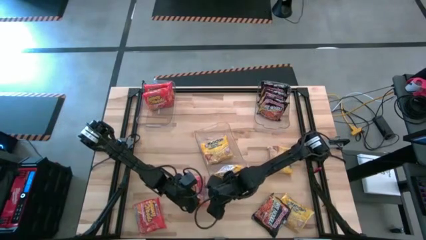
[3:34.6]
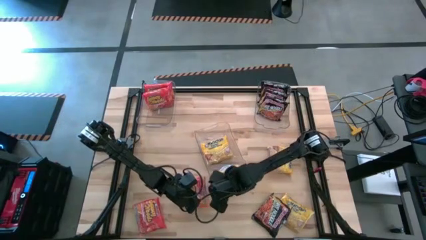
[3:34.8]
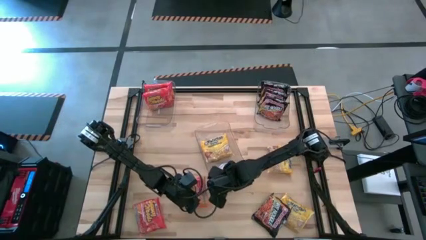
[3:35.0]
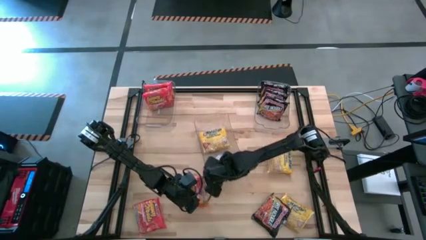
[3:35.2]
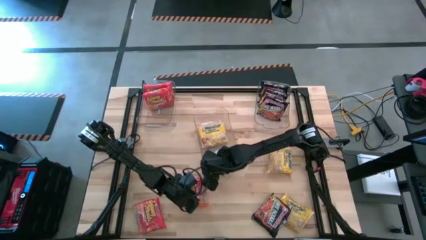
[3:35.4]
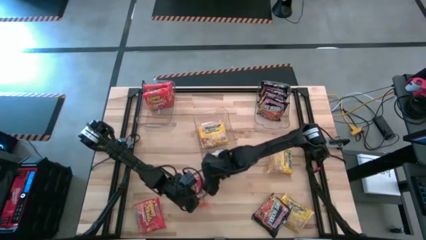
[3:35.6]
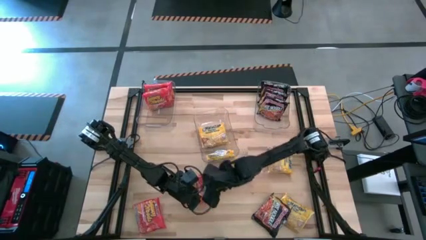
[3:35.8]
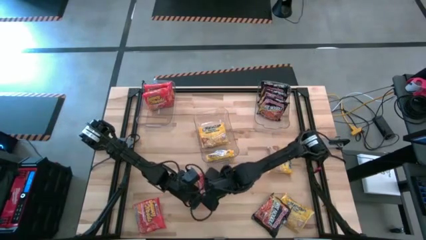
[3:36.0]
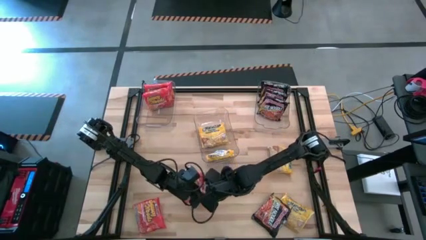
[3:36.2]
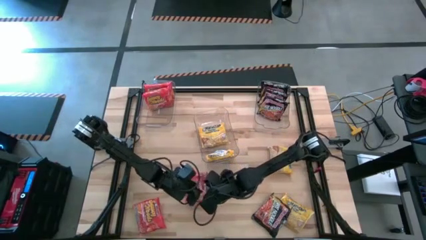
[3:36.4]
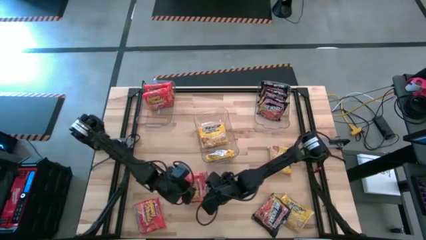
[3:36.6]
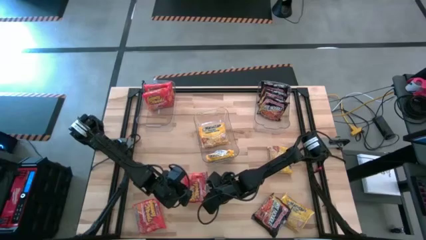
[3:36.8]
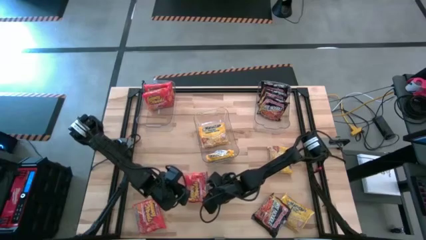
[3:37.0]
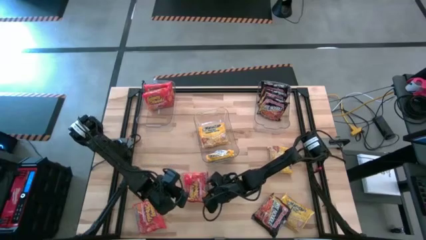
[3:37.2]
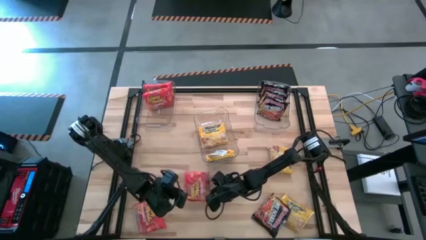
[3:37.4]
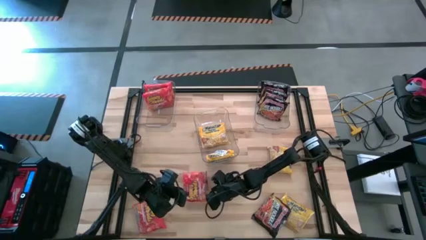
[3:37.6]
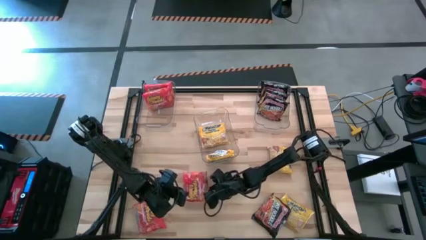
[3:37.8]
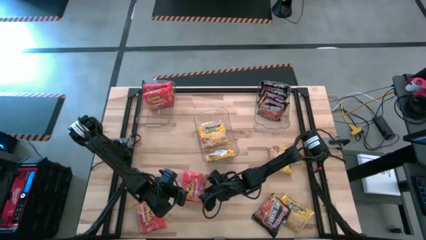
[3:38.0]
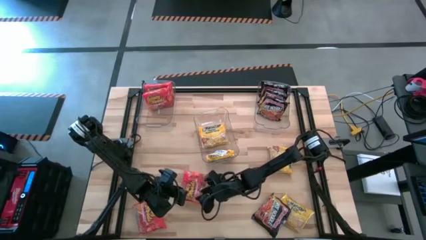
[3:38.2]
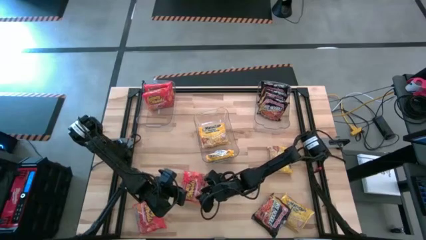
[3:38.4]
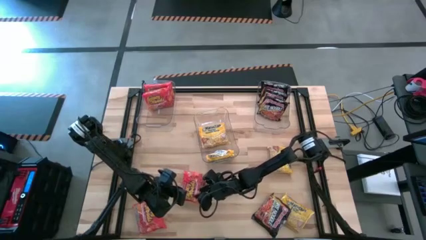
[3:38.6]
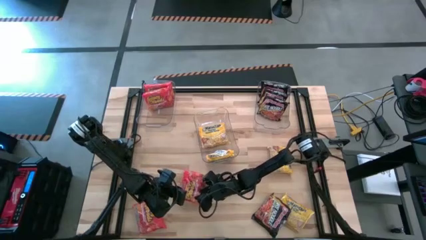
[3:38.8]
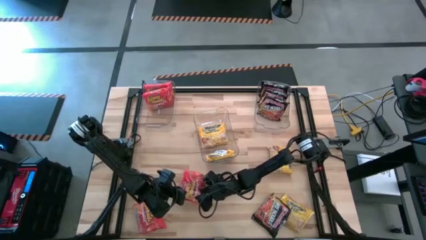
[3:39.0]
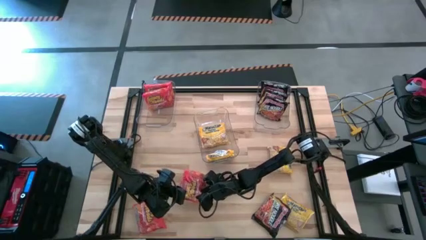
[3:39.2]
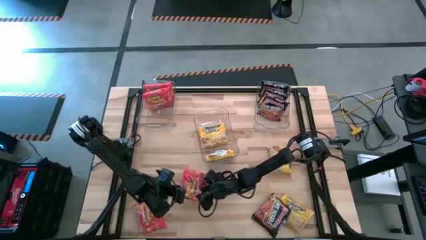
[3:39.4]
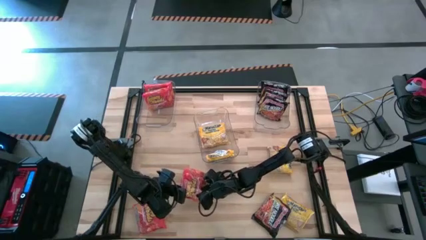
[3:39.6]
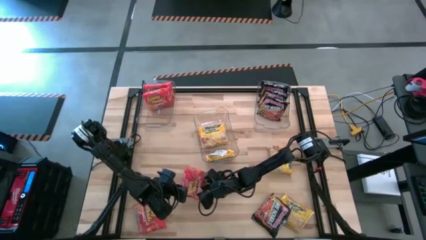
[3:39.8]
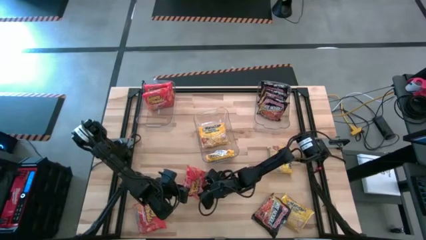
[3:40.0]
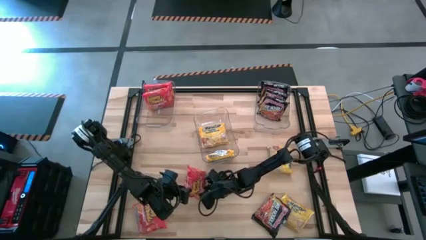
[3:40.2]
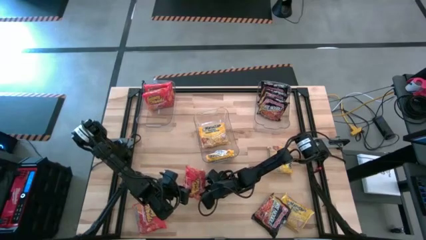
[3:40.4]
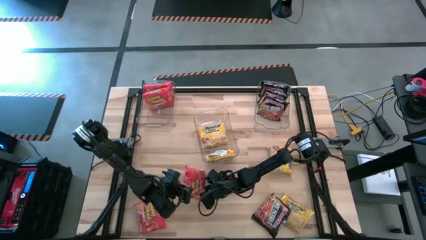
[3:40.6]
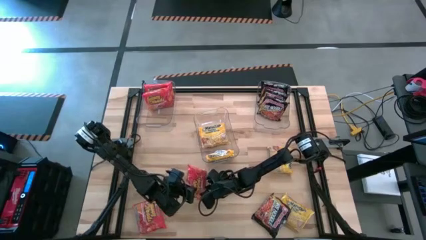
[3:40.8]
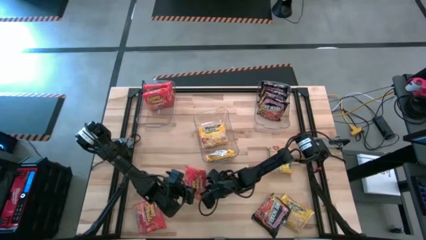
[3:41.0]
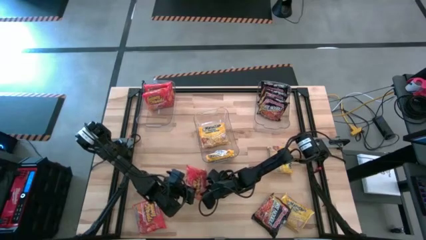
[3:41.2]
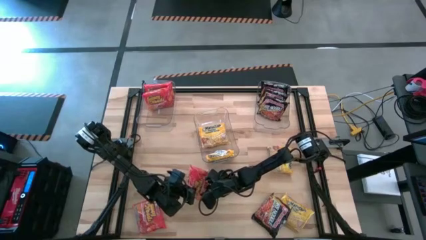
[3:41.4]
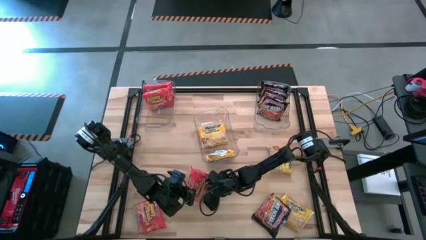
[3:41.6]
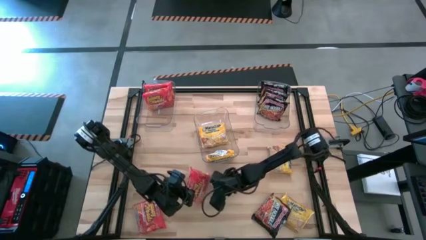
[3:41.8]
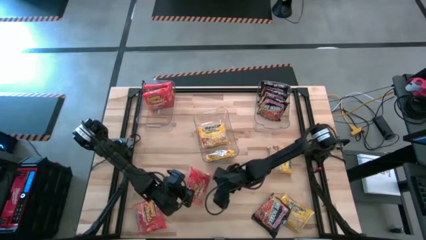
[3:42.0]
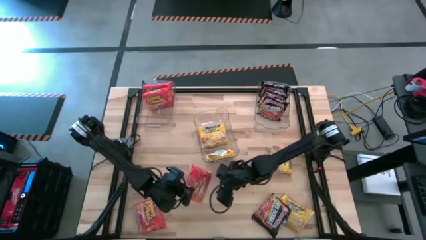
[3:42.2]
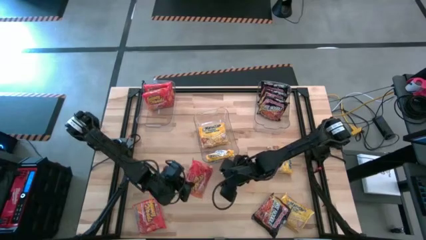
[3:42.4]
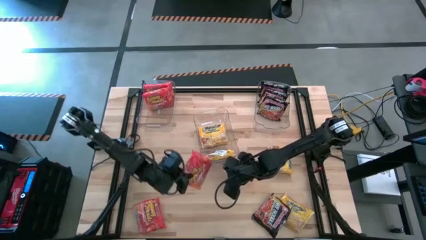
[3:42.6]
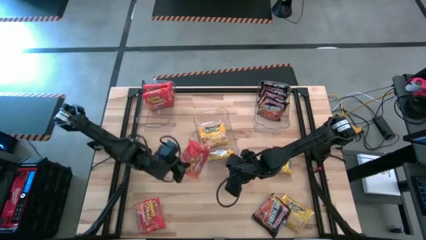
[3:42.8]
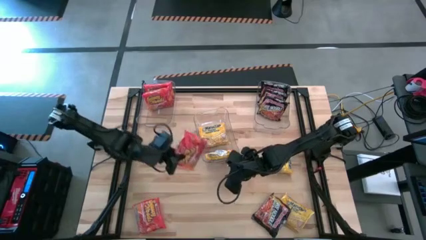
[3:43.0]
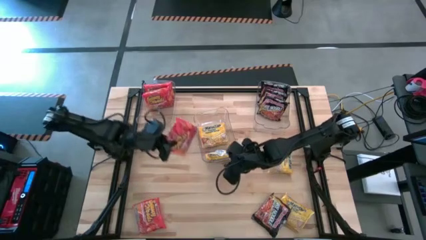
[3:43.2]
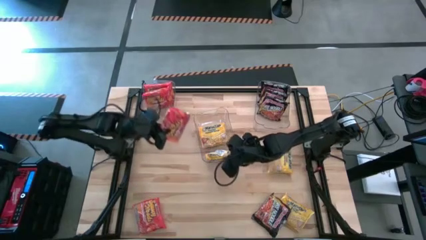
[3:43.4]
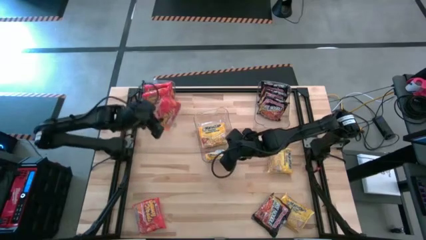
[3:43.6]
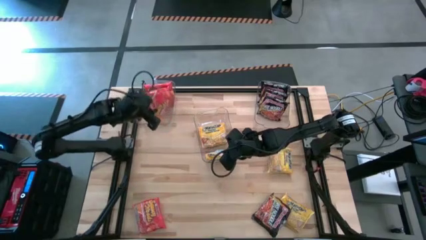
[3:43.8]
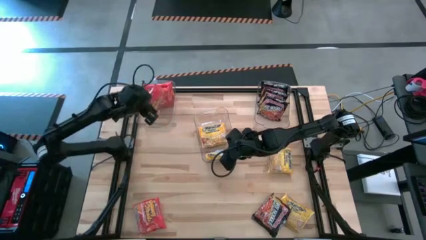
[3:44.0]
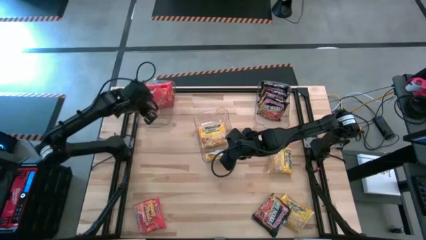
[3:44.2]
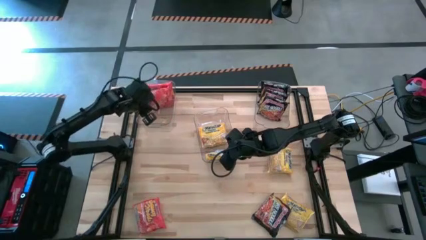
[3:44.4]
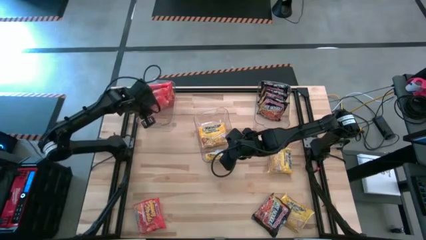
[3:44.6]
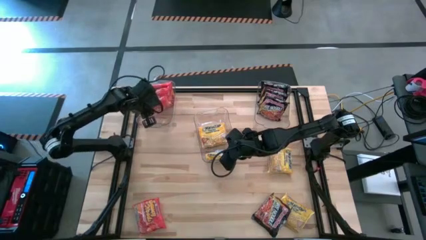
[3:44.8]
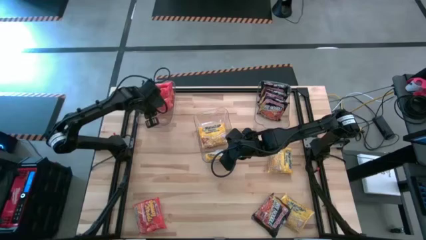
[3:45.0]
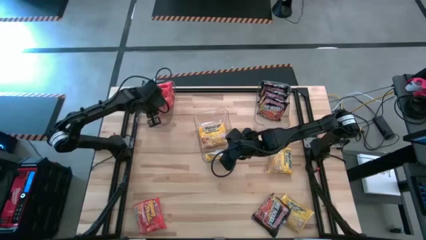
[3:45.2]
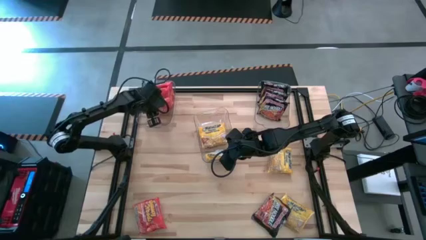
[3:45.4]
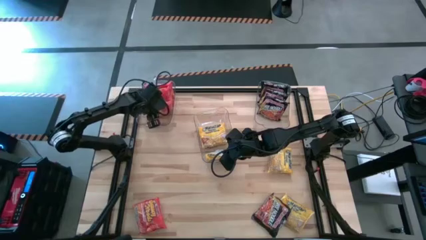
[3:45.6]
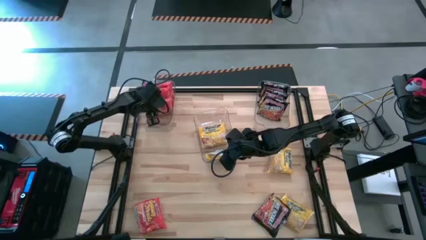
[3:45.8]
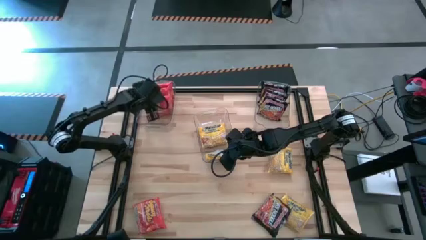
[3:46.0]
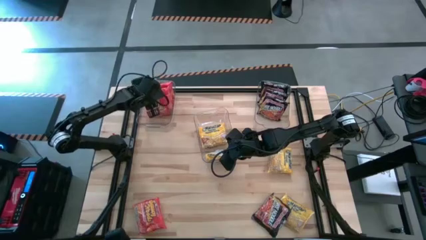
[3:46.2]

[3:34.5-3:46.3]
Task: Sort Maruchan noodles
Put the top orange noodle pack into the top left transparent bin

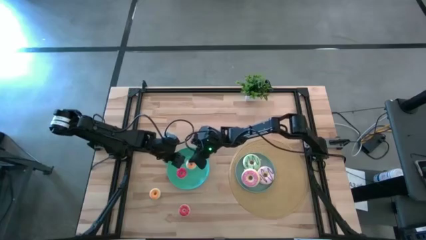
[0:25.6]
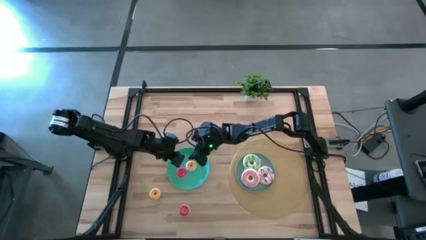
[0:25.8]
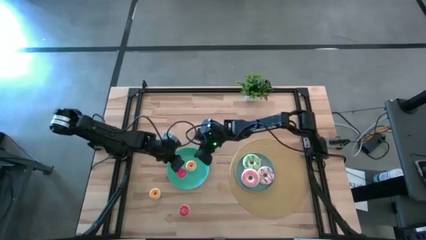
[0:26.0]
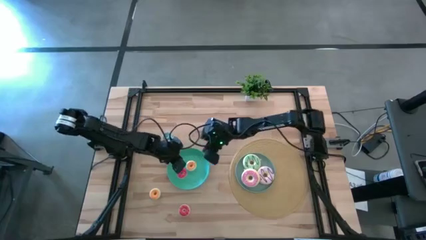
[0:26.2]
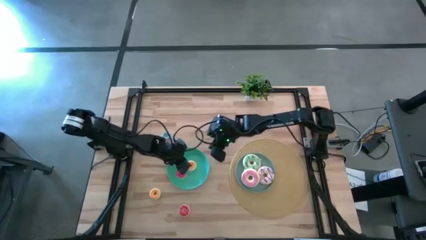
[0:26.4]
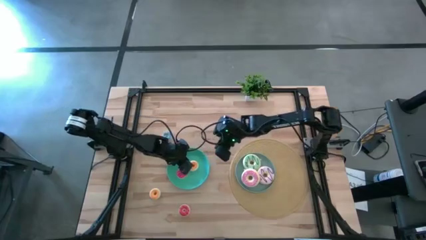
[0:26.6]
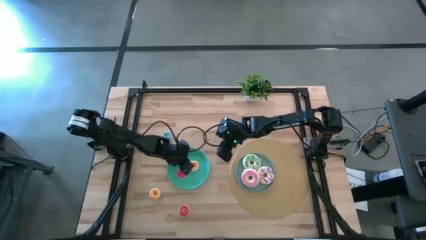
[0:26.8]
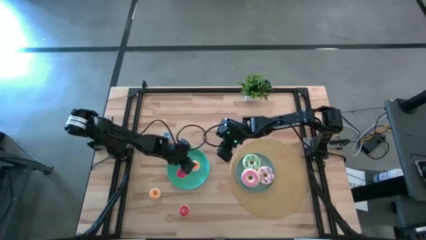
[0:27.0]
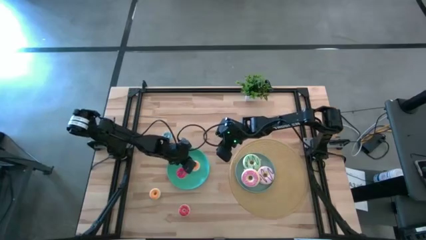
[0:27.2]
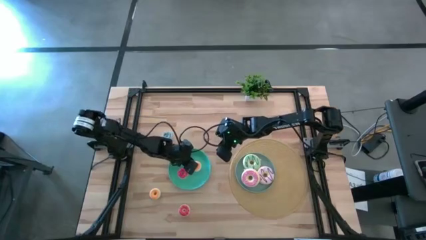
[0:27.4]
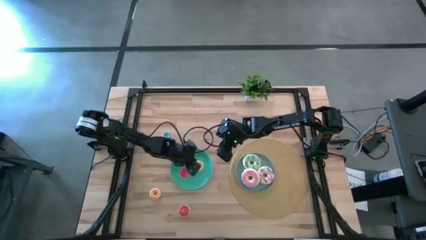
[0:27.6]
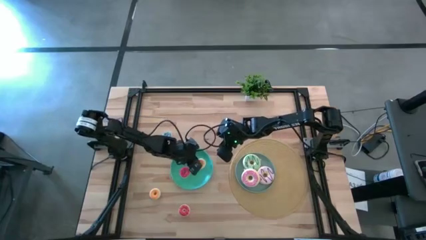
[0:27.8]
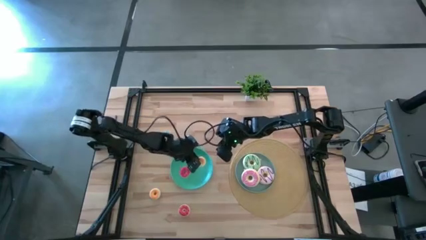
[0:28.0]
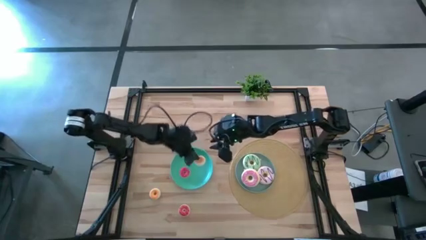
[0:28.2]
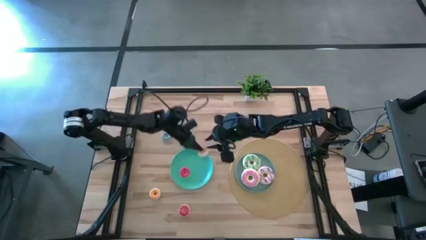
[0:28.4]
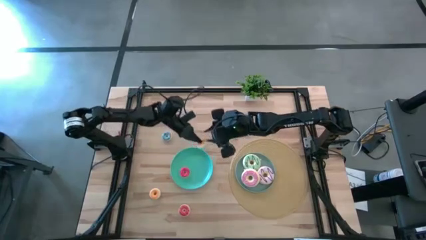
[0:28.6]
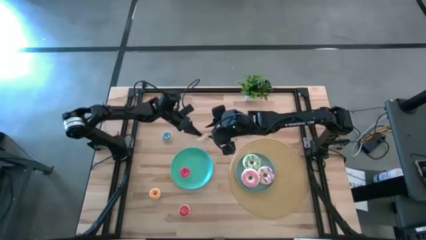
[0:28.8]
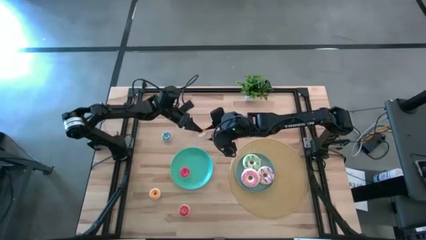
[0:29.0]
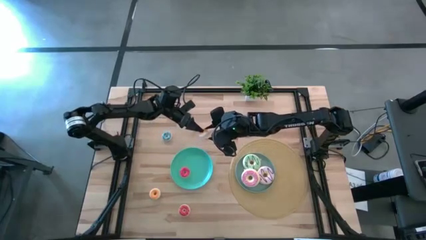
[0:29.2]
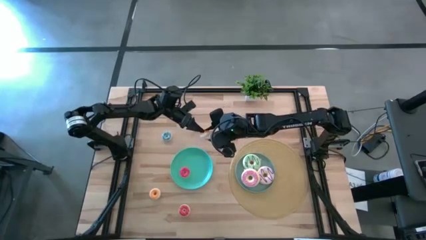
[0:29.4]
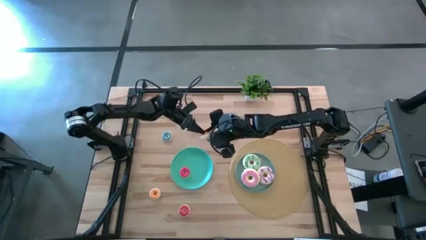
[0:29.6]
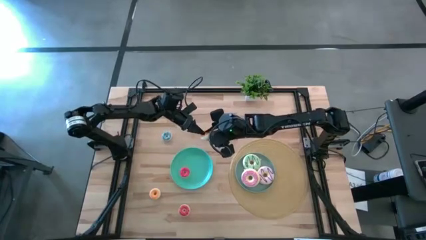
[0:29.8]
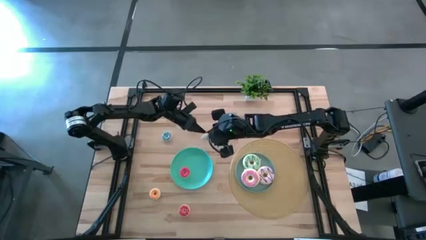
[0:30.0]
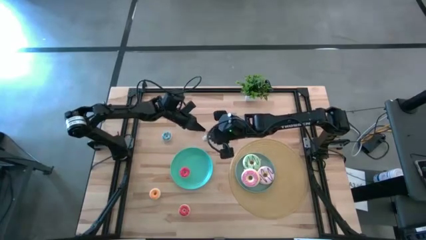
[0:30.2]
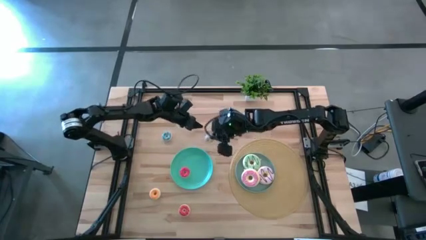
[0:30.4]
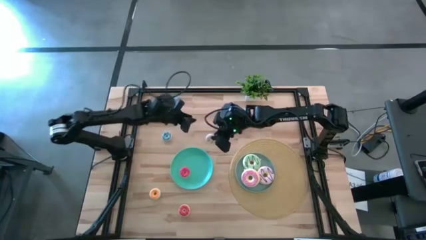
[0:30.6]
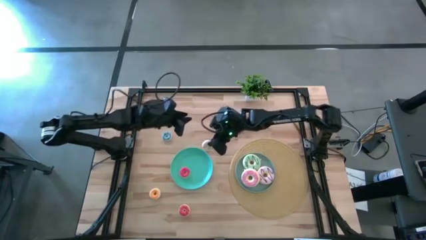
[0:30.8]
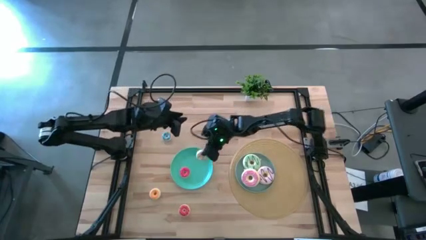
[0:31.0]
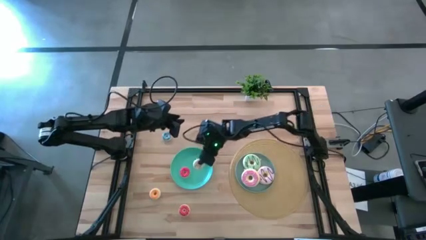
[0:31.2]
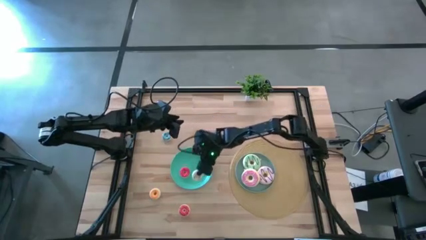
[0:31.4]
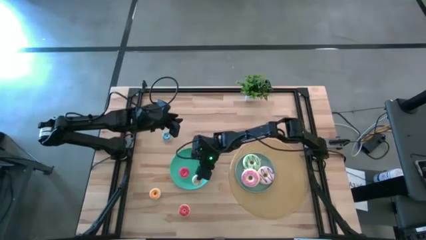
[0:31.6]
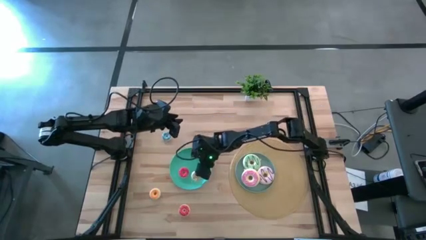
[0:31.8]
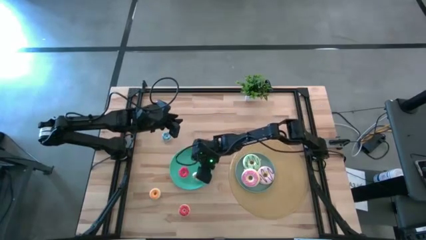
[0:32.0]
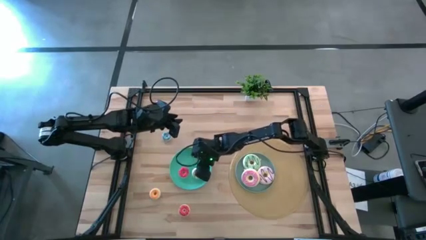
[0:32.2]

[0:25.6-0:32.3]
Task: Pick & Place donuts
Put the small white donut on the green plate
